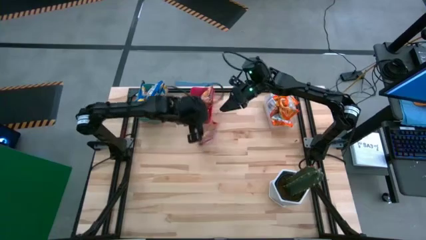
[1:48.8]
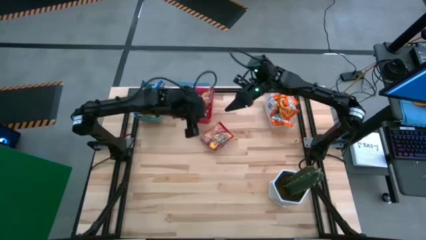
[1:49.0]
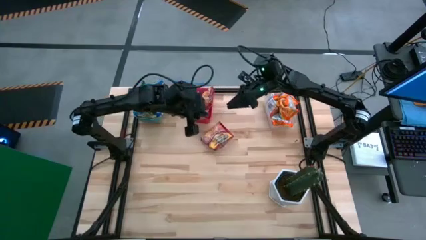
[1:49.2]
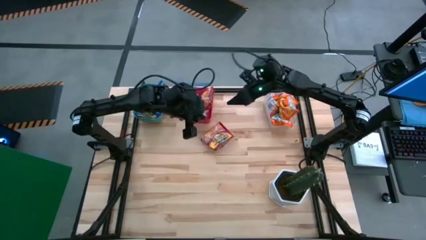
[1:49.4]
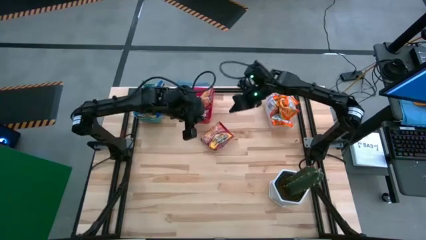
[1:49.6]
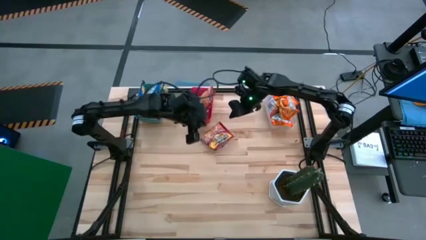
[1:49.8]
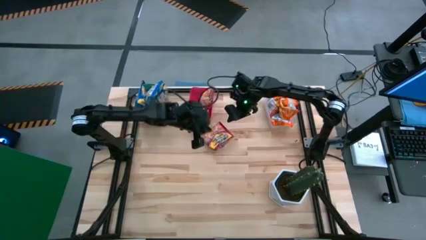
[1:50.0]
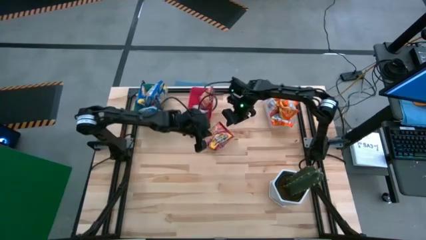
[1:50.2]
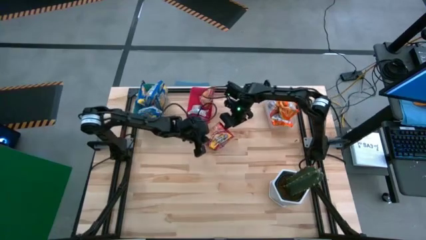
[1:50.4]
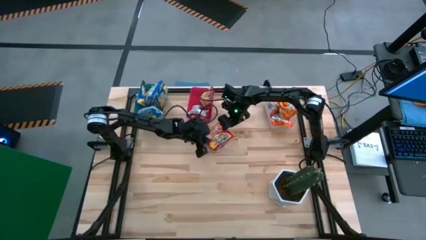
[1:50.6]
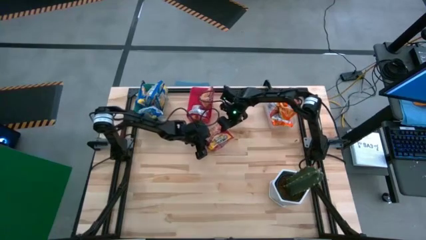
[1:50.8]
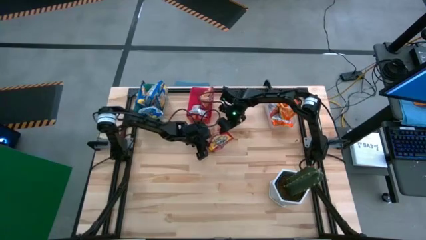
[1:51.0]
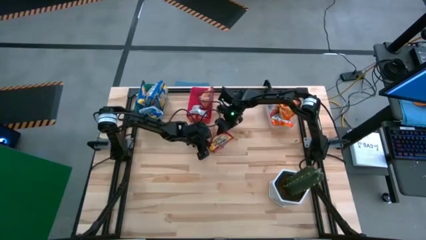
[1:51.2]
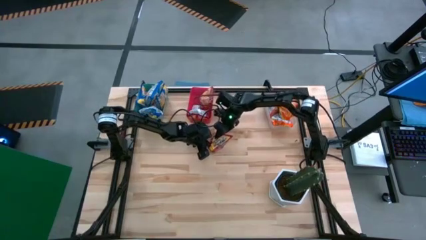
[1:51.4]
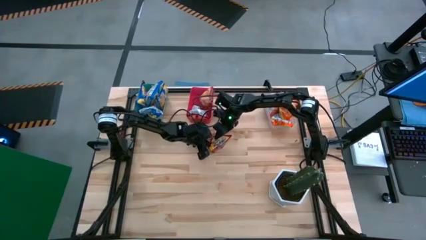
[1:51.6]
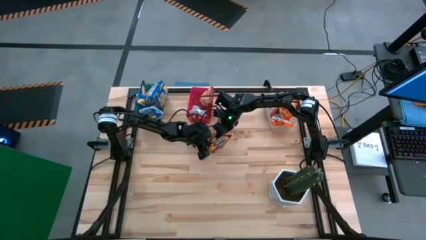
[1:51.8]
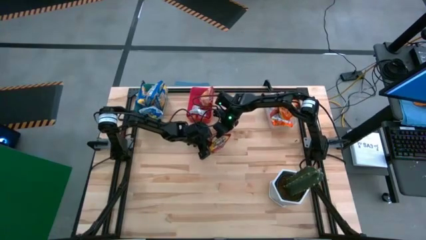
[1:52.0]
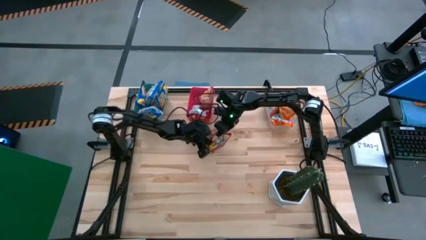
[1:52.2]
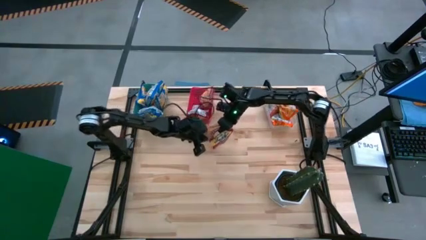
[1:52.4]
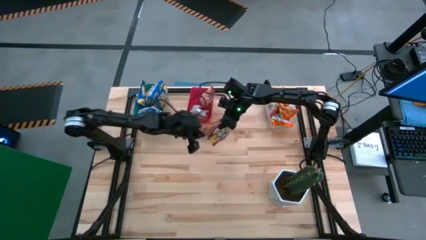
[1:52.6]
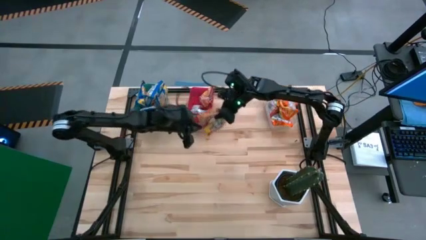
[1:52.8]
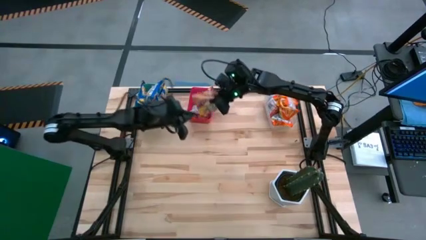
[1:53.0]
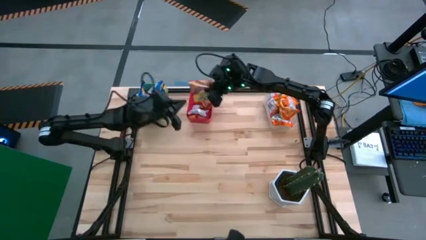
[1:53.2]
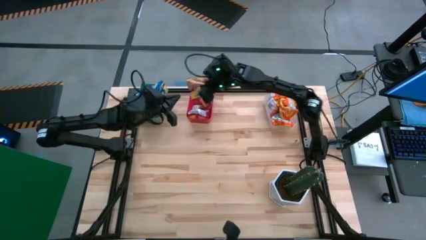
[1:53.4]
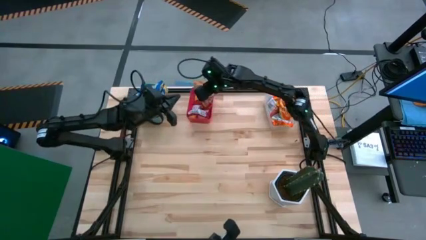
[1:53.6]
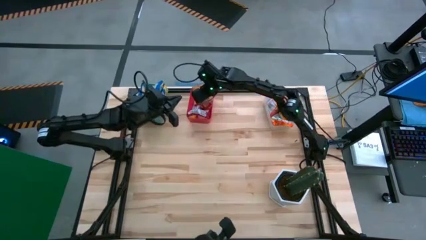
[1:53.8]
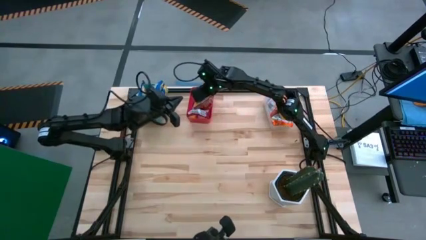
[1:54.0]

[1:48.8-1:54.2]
Task: Sort Maruchan noodles
Put the red noodle pack into the red bin

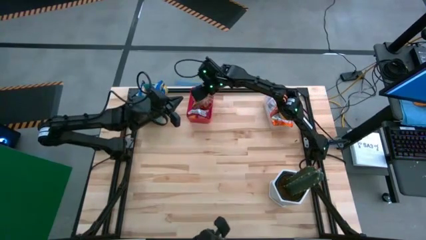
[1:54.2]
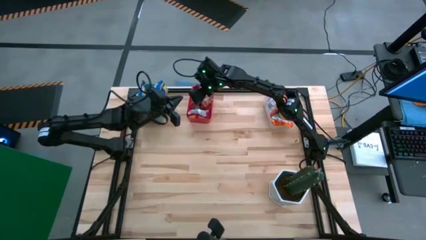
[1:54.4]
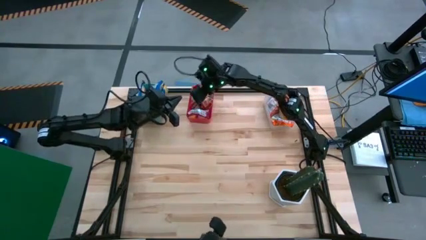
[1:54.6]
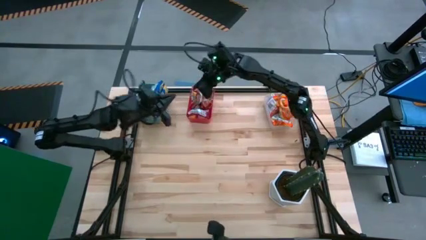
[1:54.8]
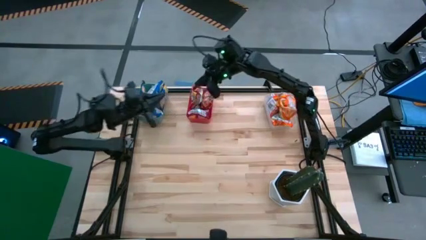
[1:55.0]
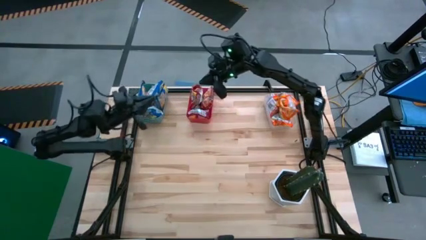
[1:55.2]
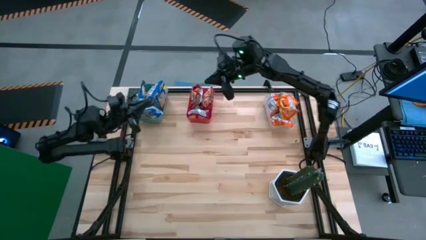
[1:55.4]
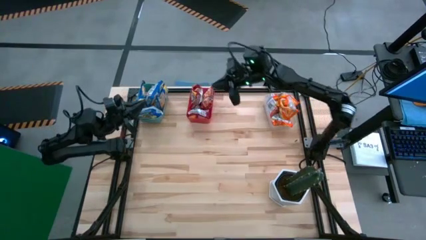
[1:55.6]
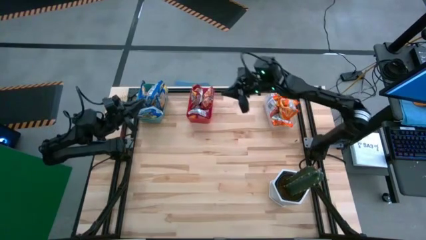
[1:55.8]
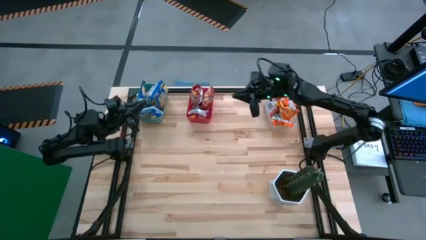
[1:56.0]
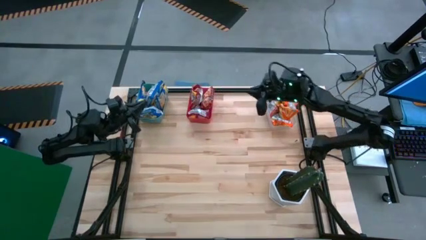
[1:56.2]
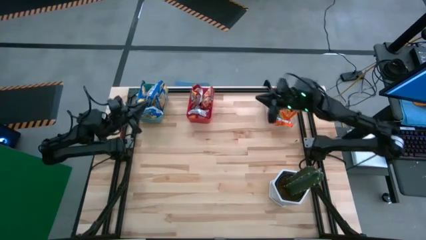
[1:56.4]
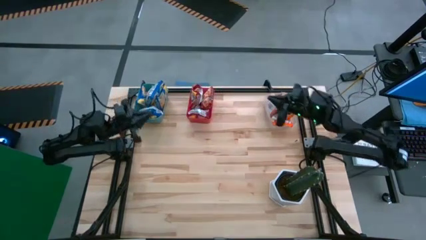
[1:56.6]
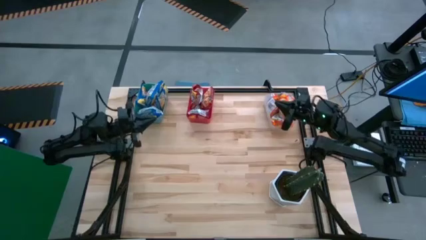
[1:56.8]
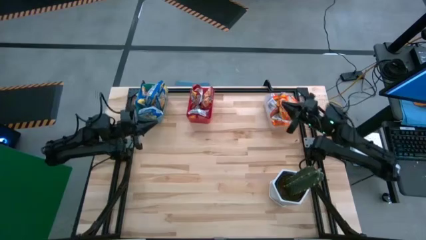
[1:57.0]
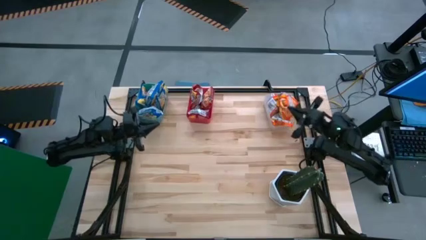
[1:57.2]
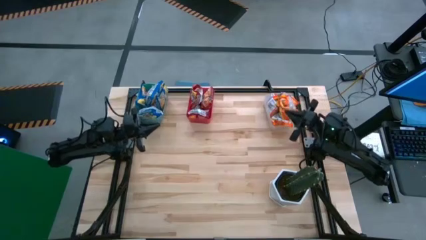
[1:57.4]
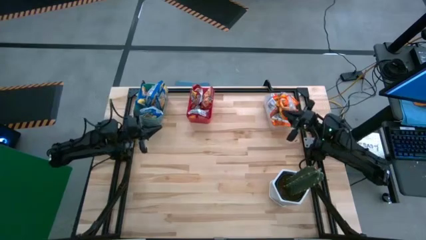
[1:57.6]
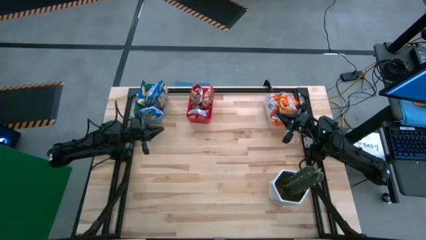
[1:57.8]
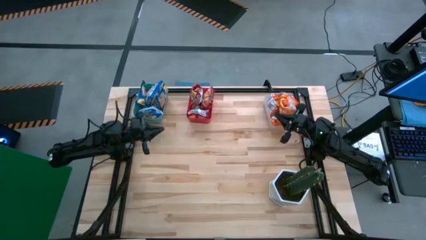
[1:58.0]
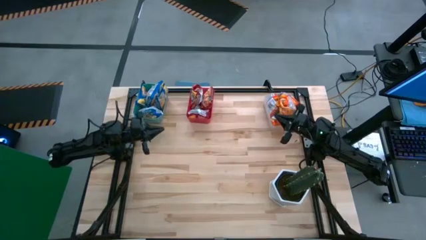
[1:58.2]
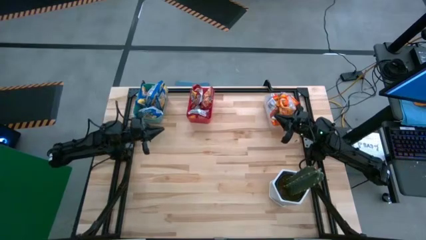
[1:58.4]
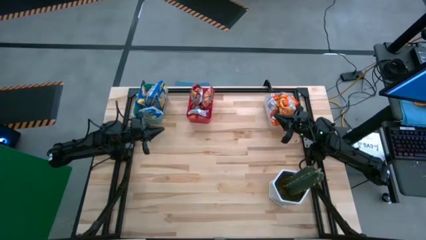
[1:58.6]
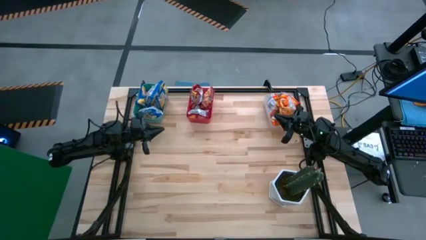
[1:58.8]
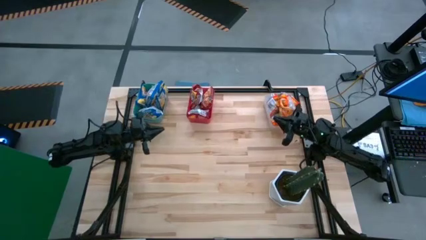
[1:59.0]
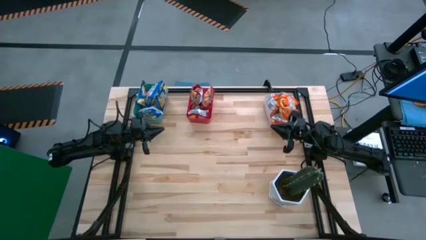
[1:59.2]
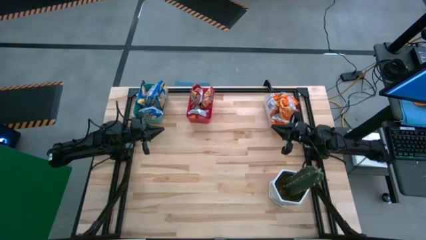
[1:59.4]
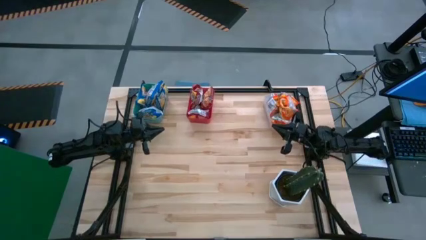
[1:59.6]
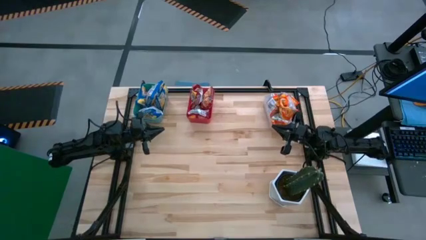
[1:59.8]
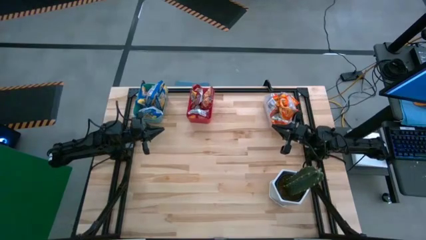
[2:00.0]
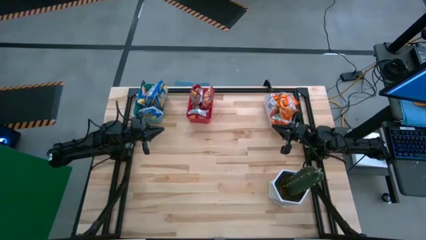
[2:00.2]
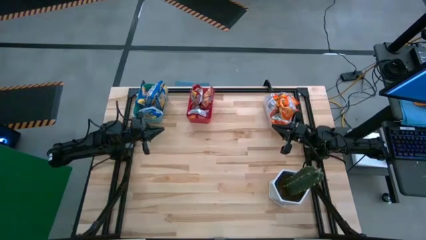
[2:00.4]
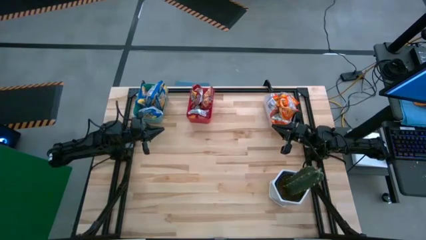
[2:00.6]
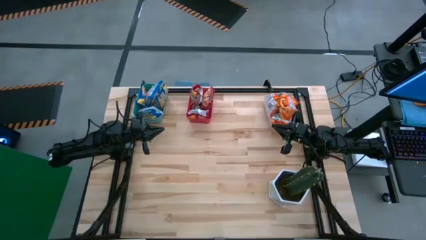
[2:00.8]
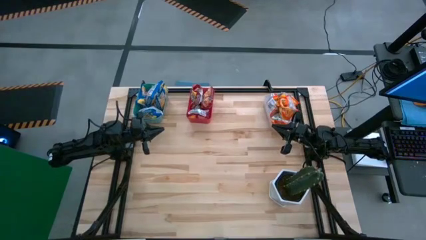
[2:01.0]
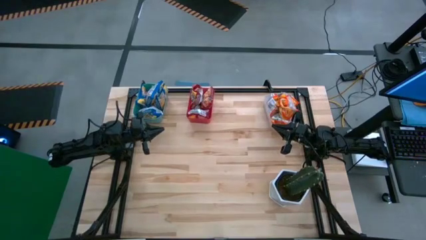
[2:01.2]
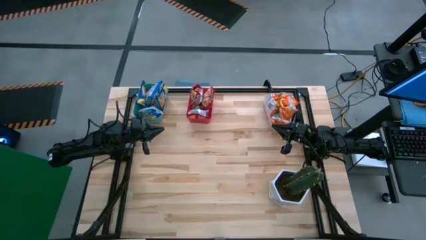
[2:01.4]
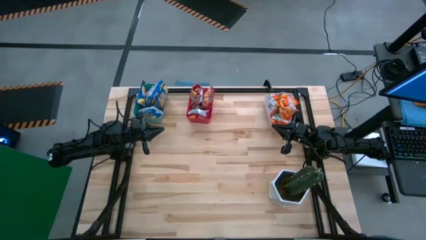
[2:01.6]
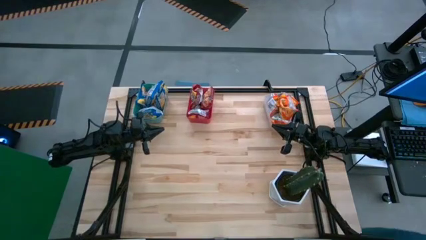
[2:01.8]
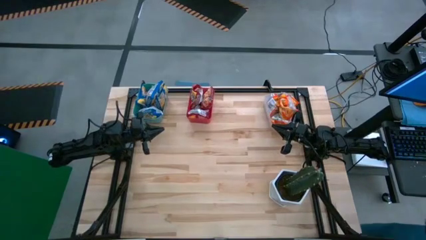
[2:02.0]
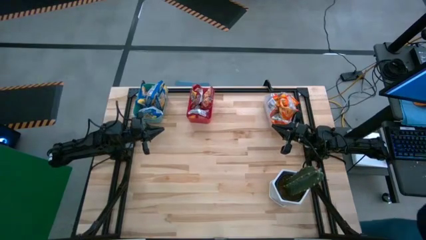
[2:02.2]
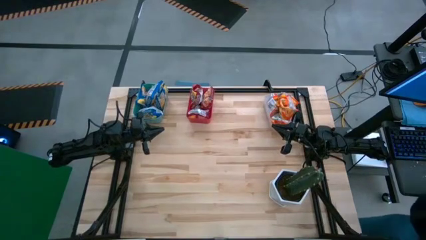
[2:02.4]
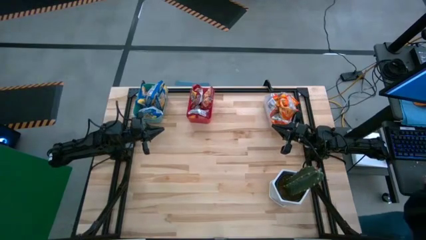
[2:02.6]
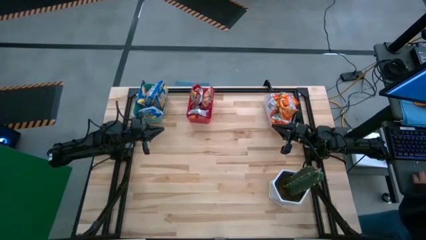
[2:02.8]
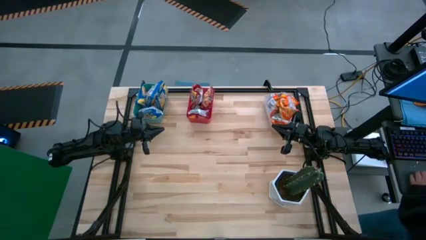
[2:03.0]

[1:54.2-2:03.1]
Return to Home Position
